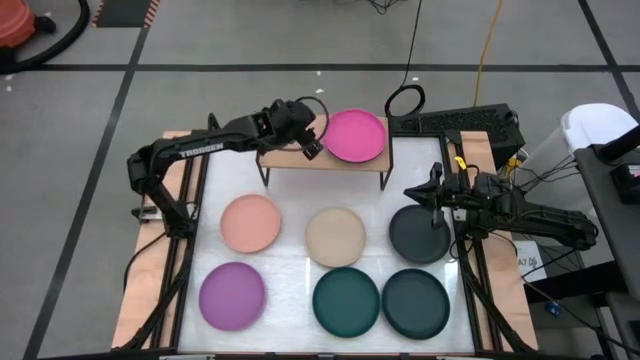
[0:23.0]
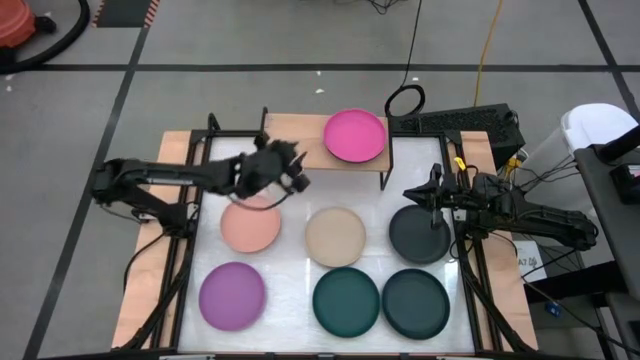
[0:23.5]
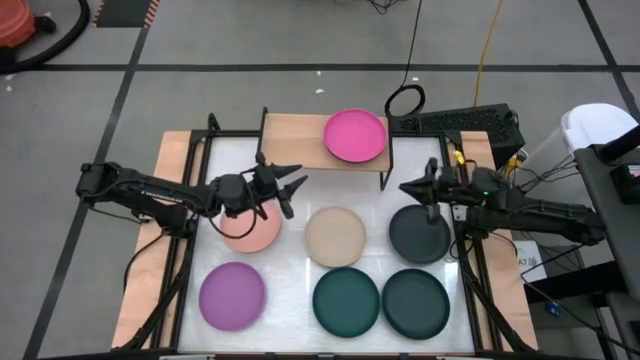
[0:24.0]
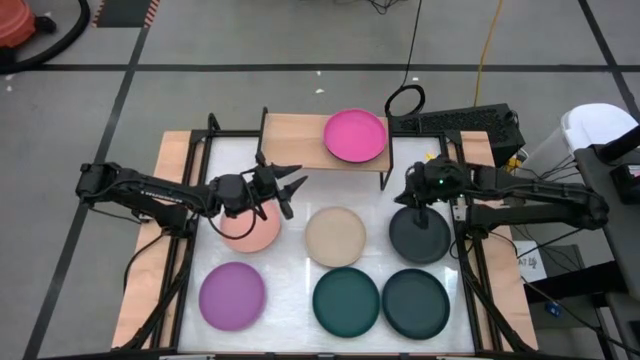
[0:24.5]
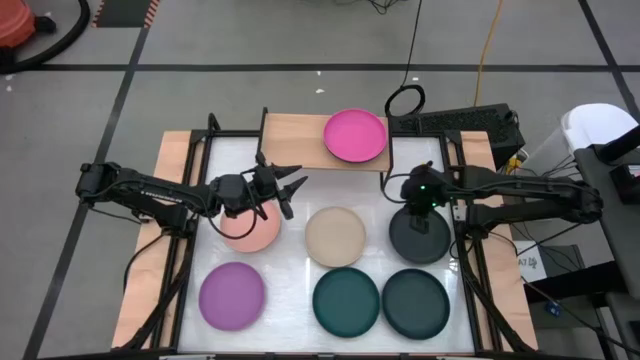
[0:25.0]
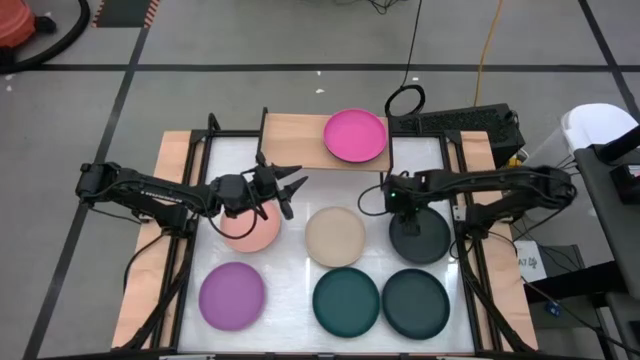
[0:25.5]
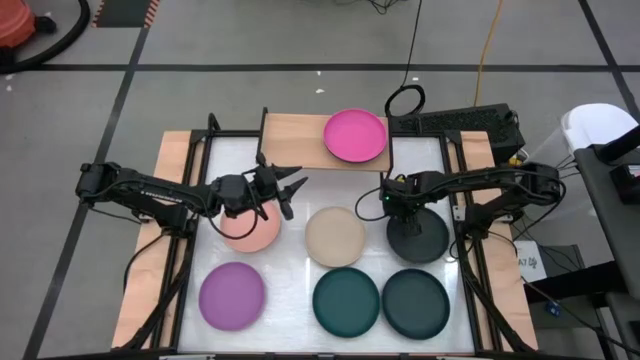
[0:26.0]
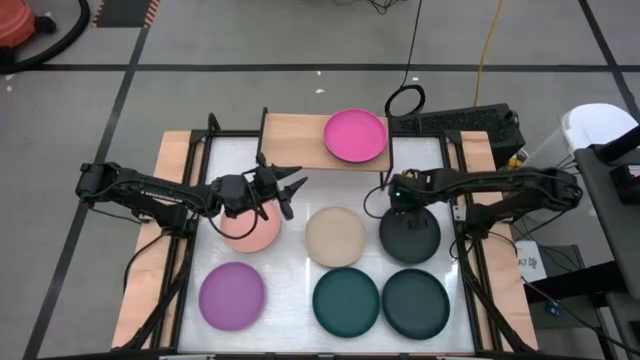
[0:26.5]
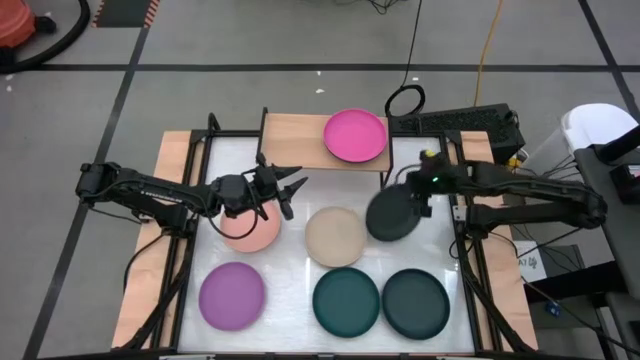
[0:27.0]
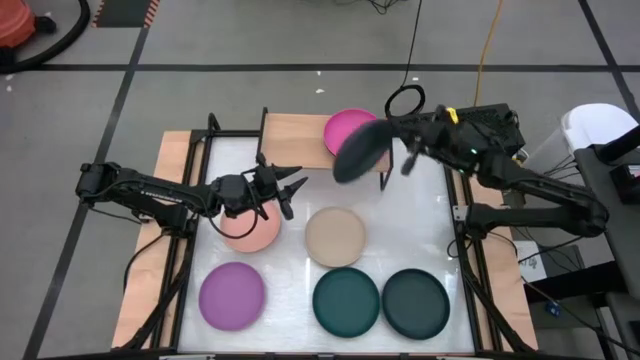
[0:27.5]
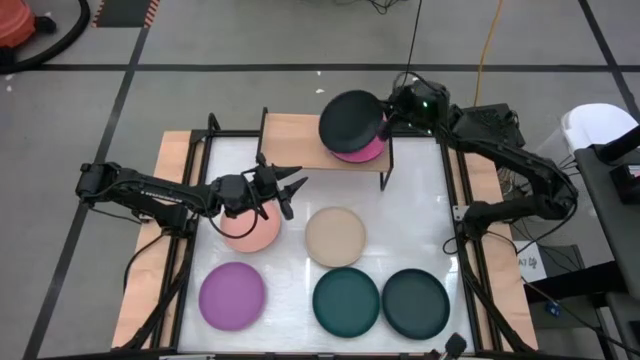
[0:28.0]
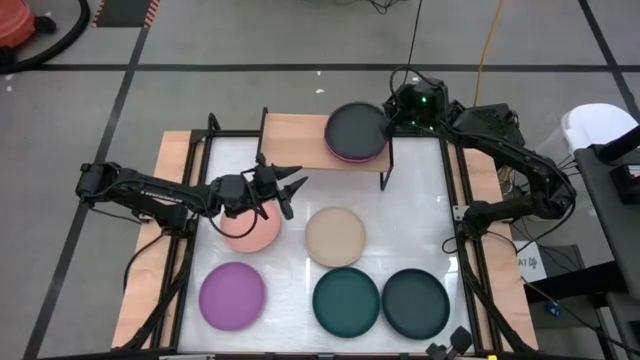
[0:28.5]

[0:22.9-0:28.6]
Task: Place and stack plates onto a shelf
Stack the top black plate on top of the pink plate on the shelf

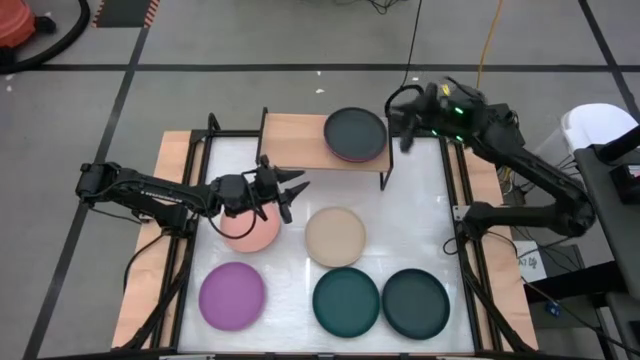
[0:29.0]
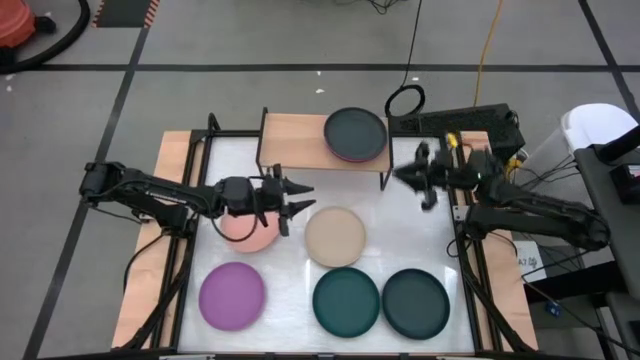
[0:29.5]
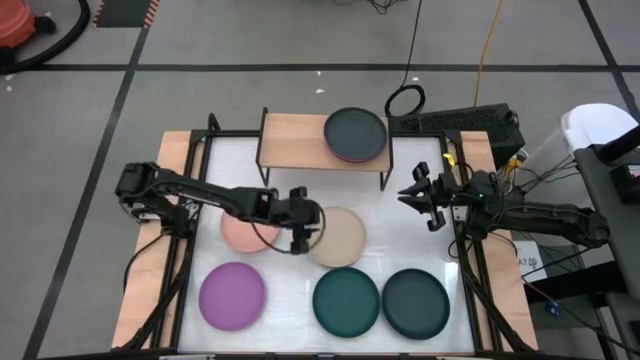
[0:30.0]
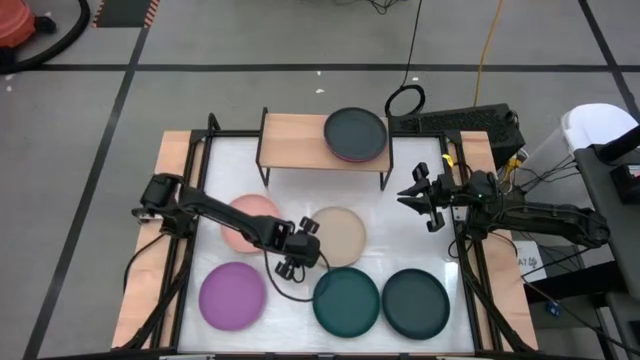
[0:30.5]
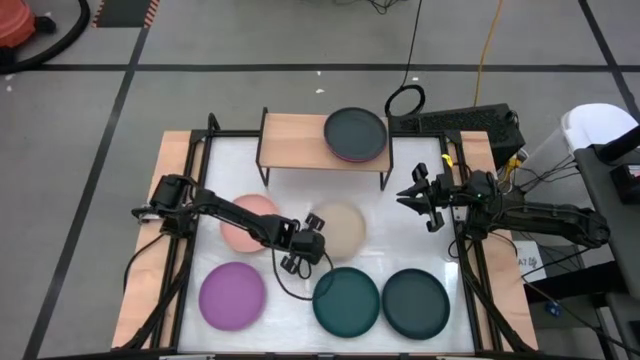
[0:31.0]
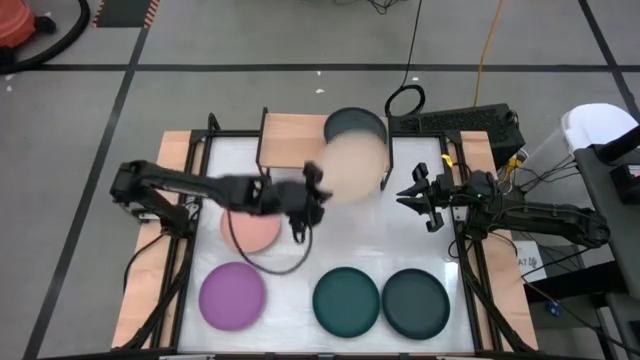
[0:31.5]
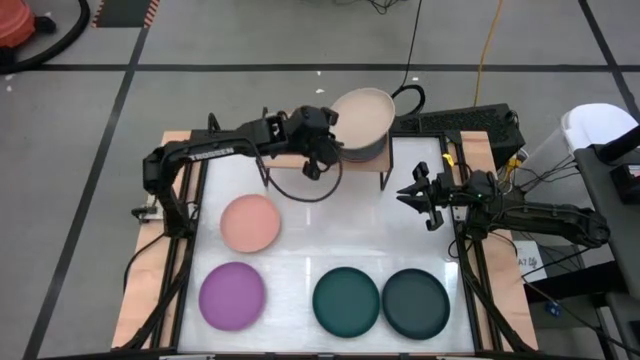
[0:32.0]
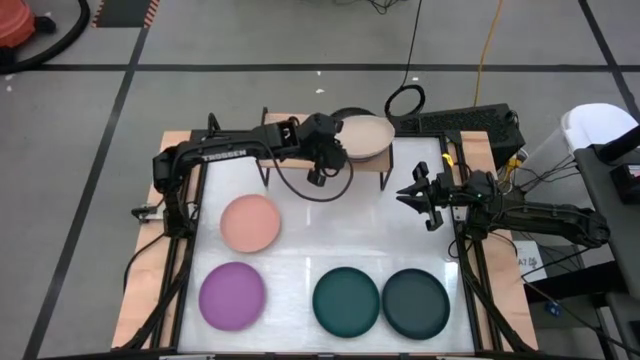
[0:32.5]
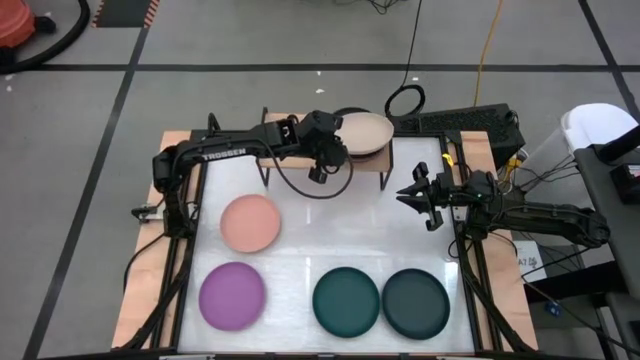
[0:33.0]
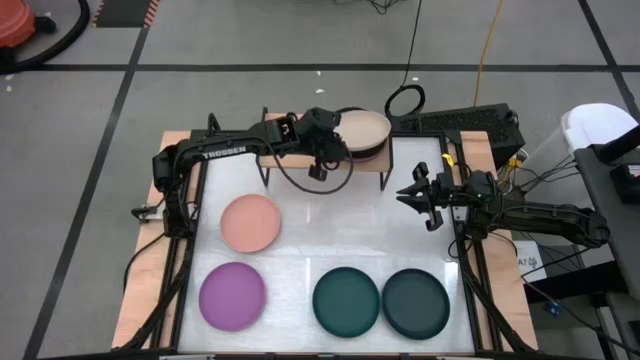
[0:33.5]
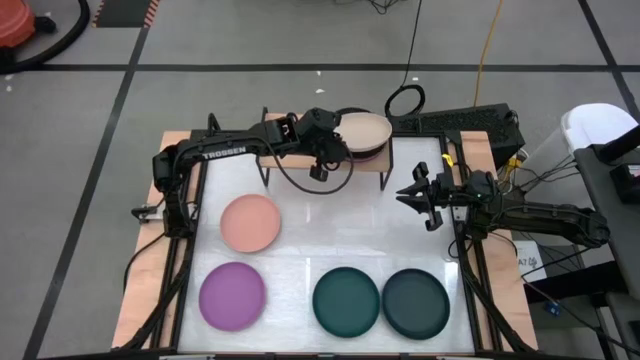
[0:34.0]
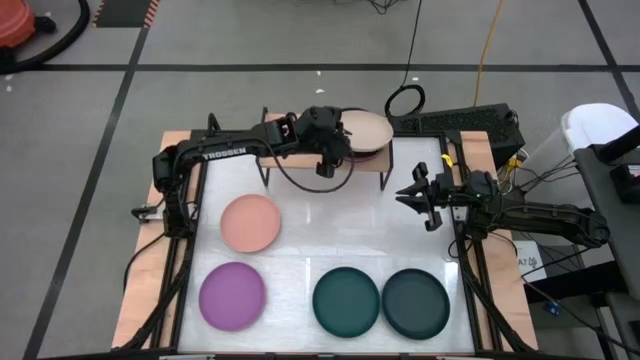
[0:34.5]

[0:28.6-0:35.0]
Stack the brown plate on top of the black plate on the shelf

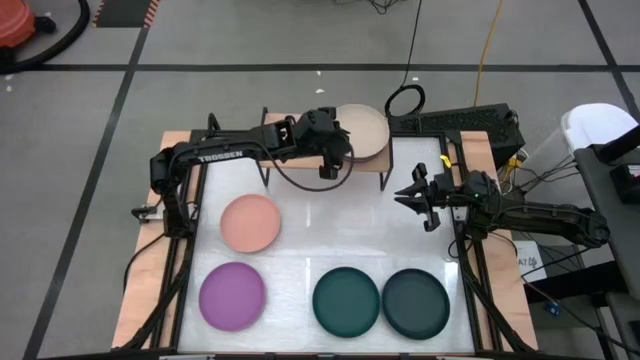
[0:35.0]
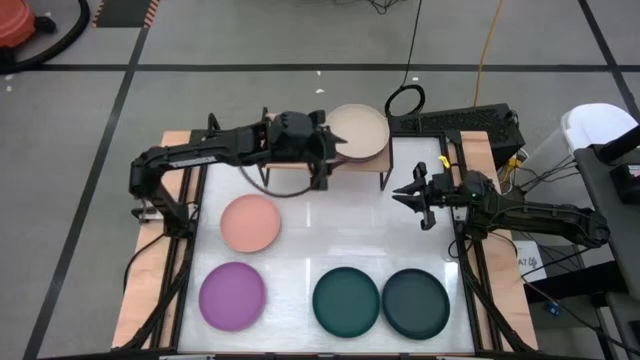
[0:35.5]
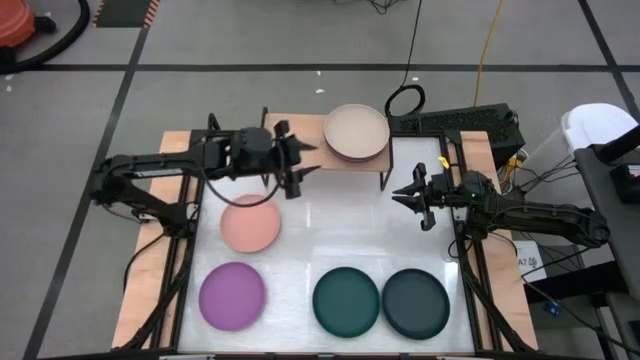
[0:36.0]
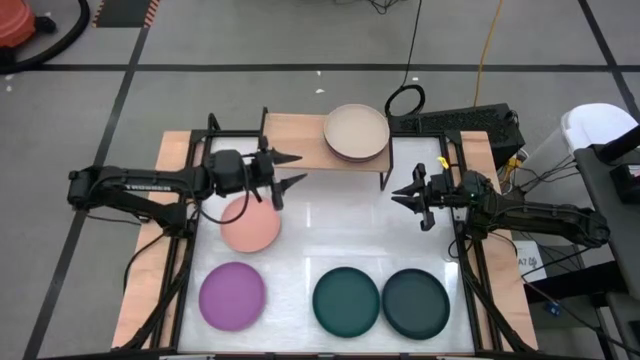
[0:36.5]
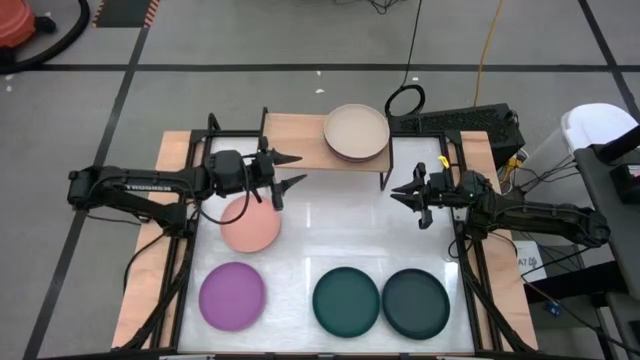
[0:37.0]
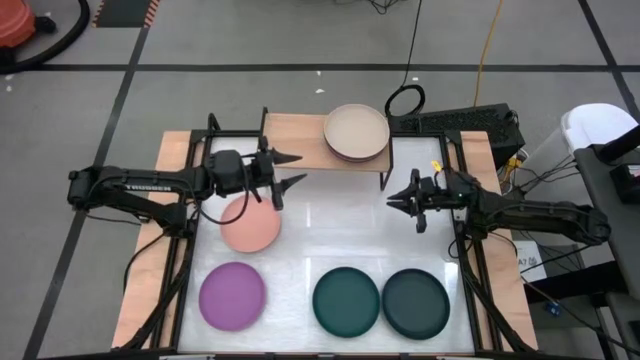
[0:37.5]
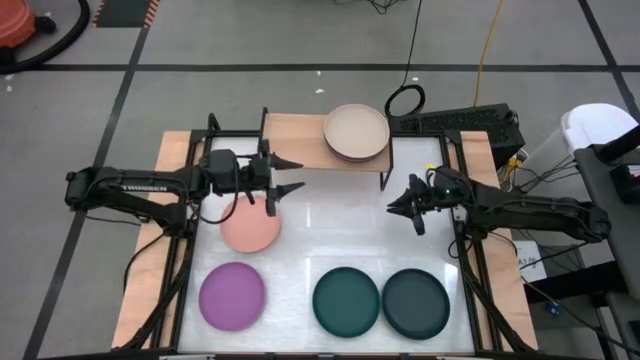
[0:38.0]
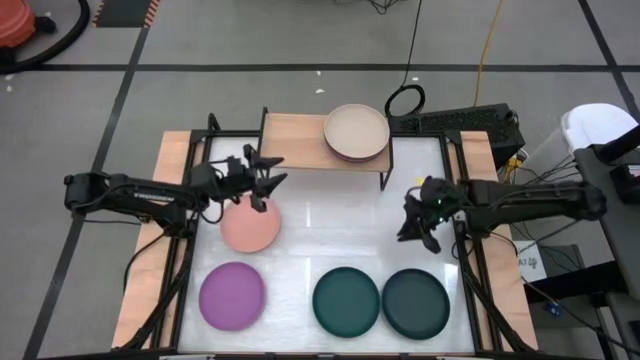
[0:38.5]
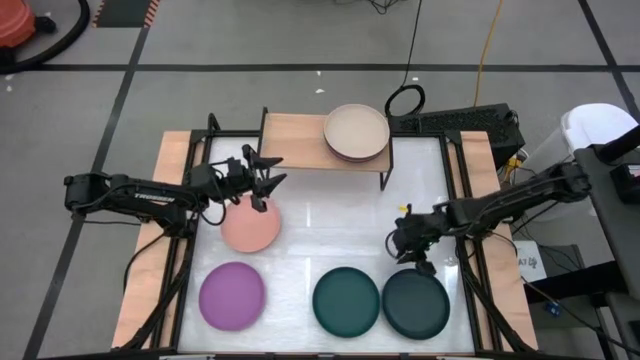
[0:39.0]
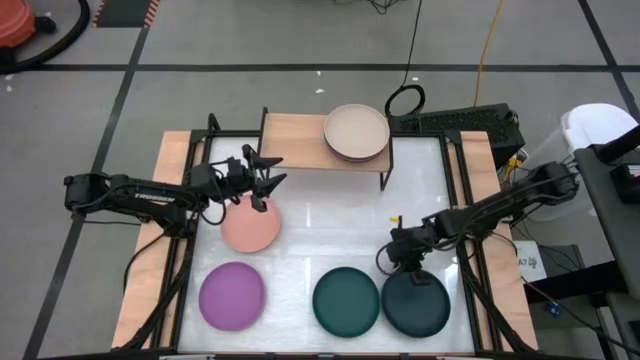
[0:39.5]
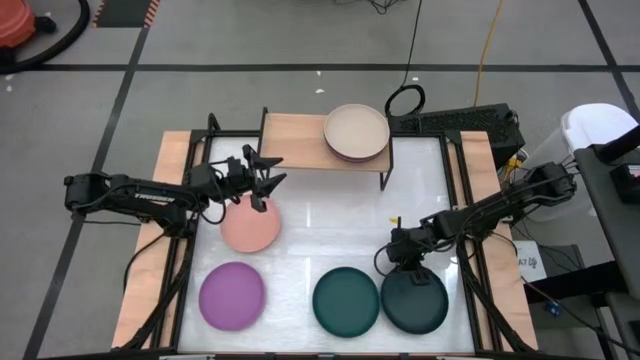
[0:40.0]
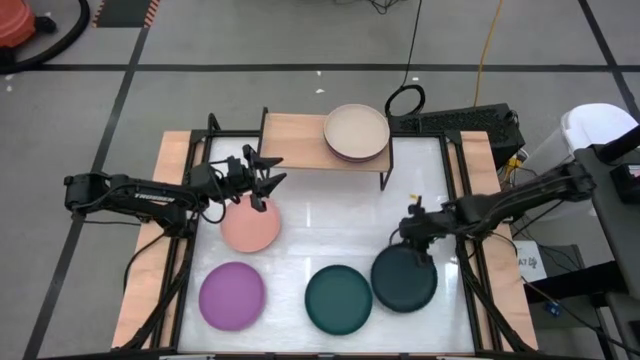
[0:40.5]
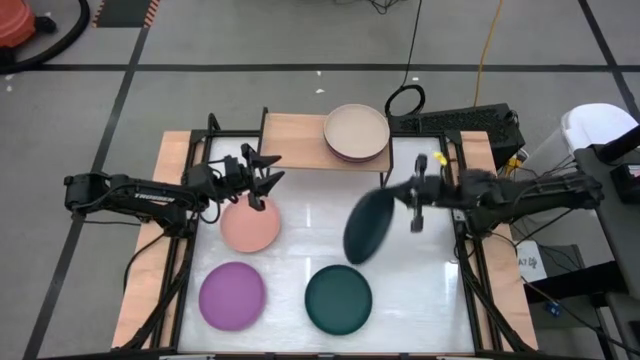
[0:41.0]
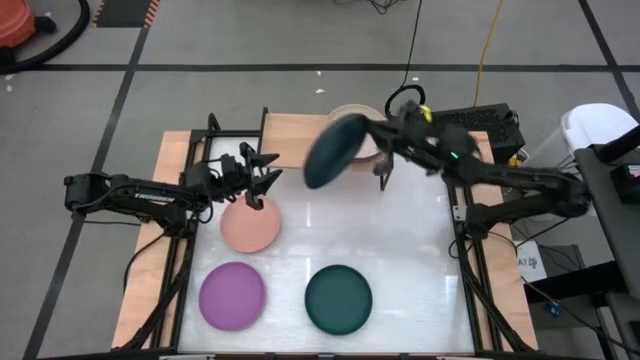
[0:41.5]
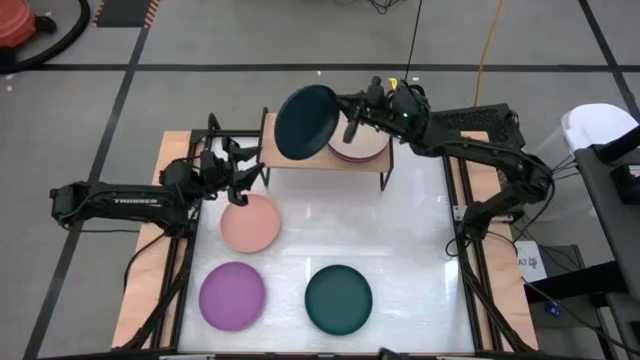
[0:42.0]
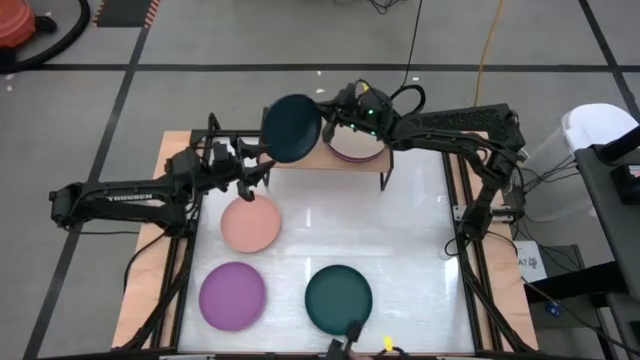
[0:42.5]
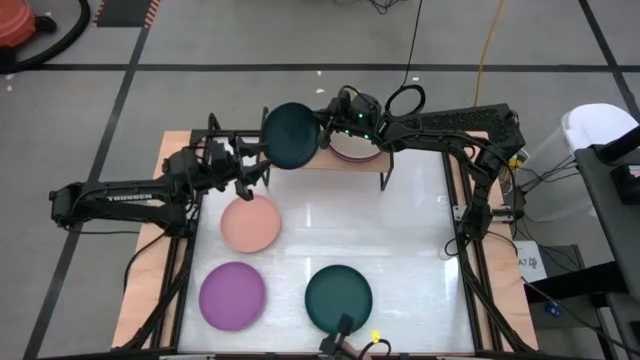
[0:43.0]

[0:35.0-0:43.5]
Put the black plate on the shelf

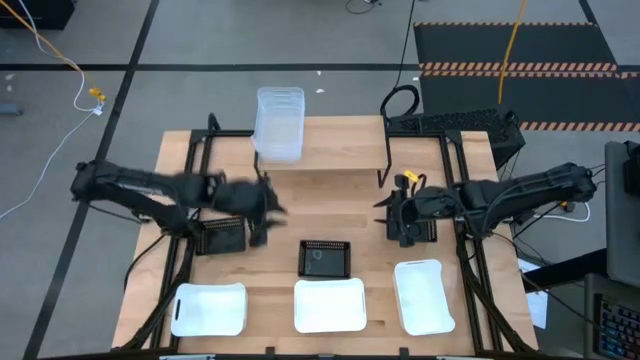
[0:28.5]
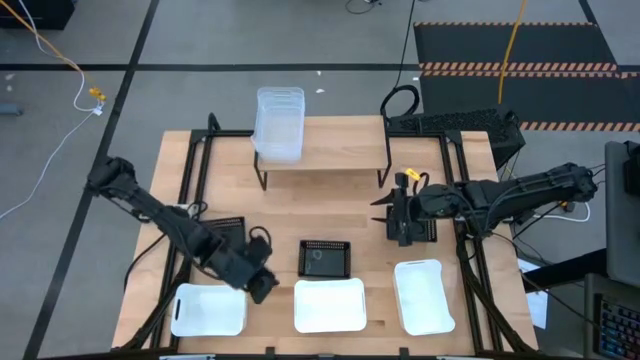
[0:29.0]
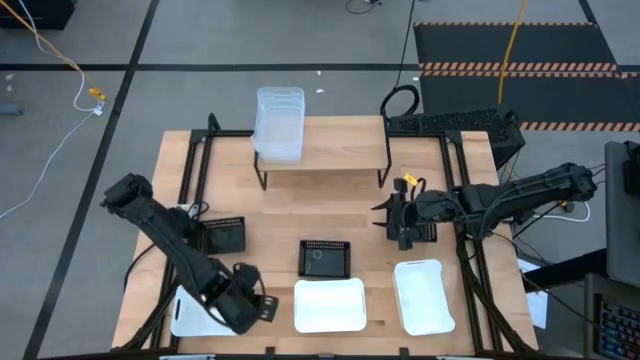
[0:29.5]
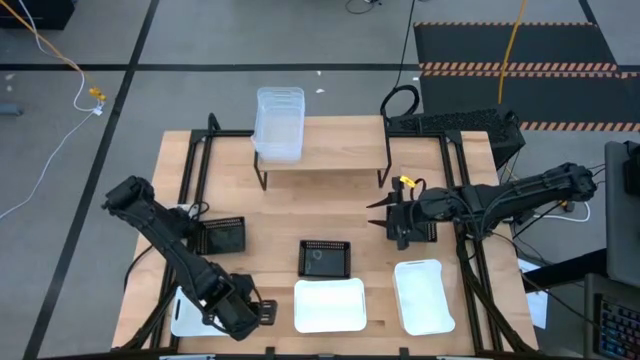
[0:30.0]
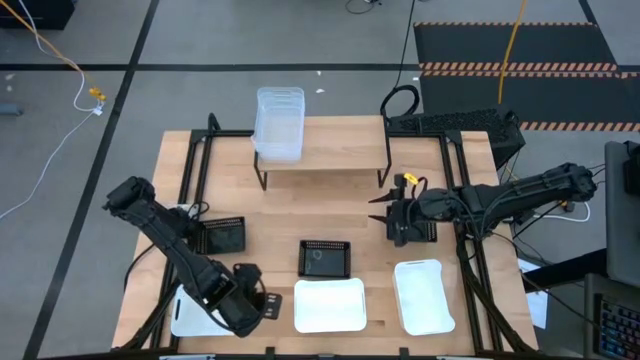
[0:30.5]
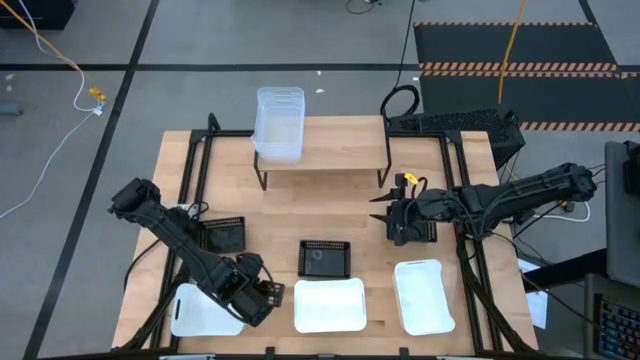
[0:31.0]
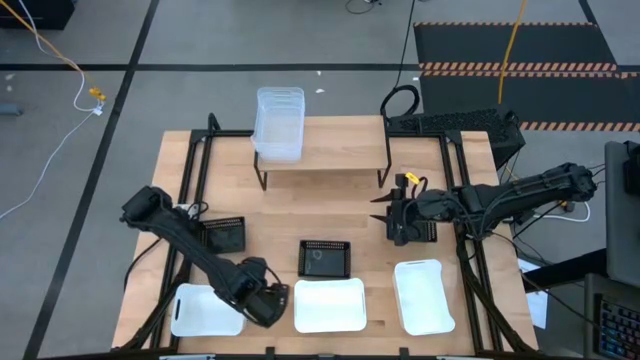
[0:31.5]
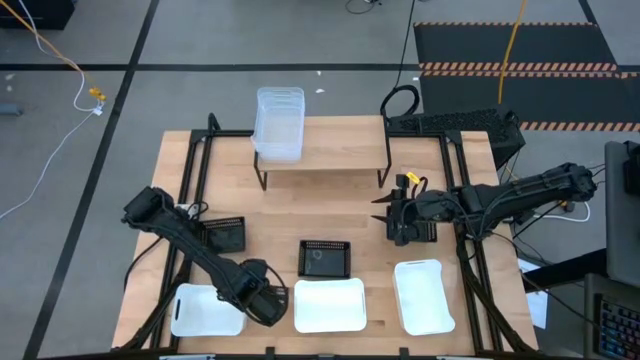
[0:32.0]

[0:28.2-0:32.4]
Task: Stack baskets on shelf by color
Put the left white bin on the shelf
